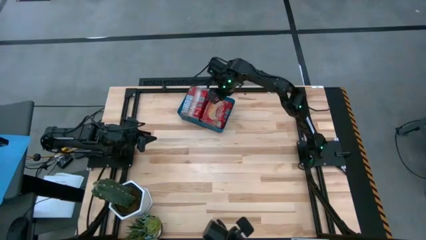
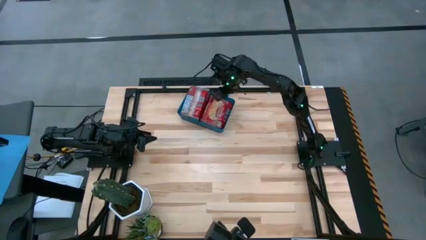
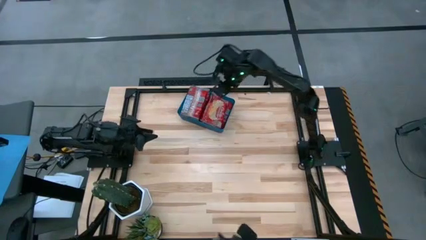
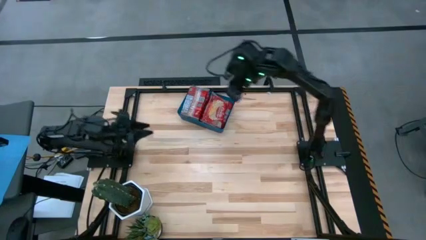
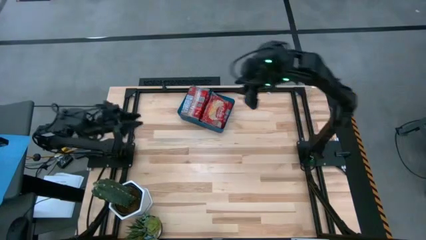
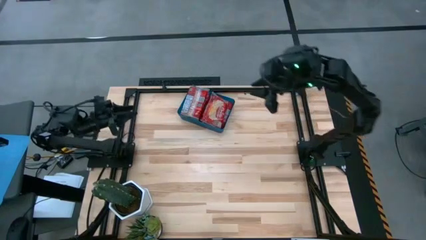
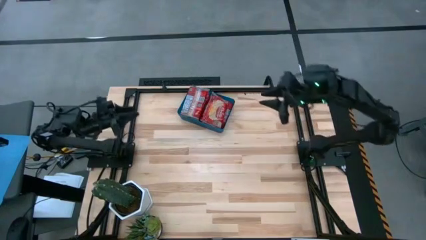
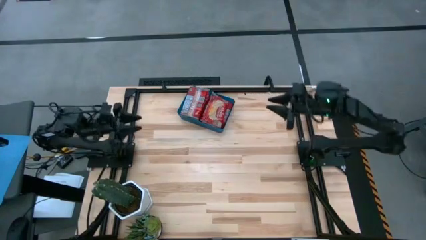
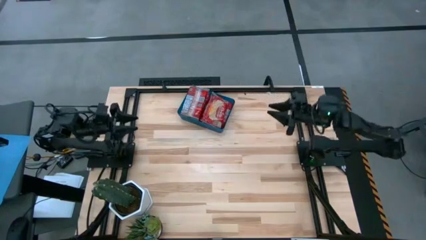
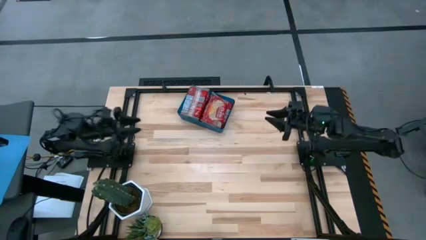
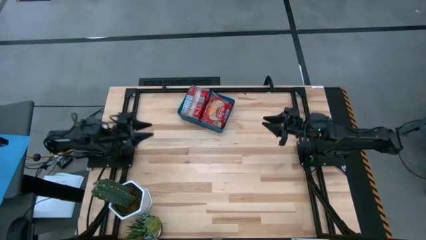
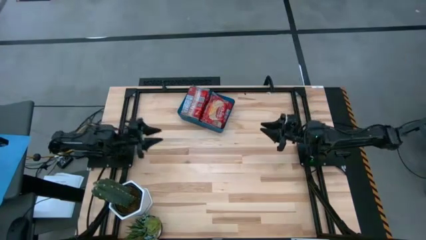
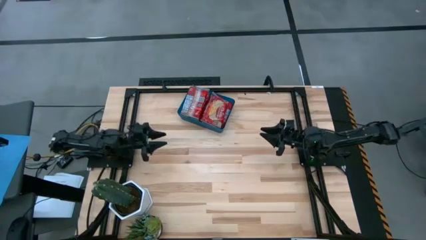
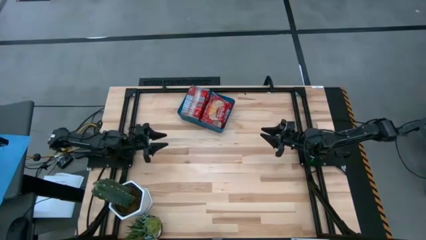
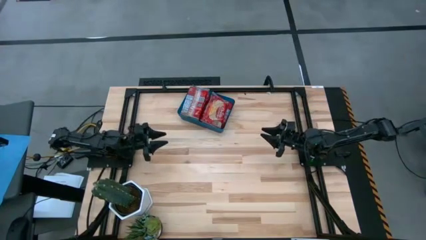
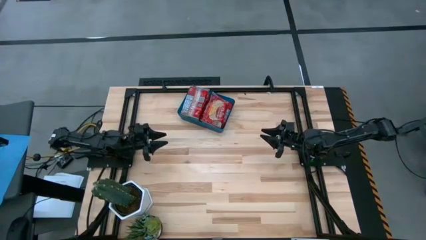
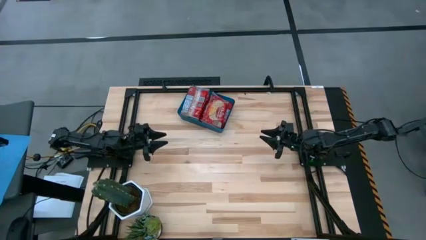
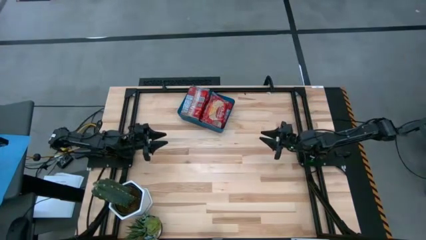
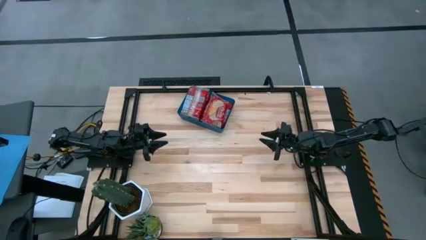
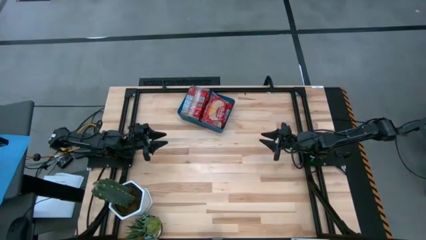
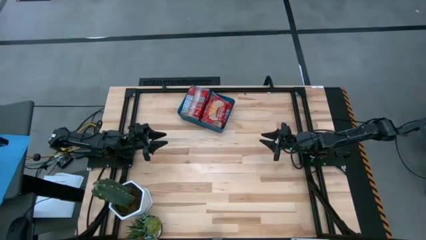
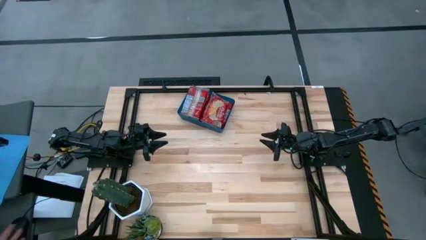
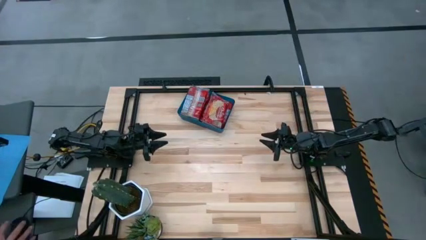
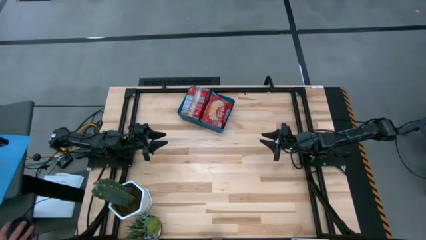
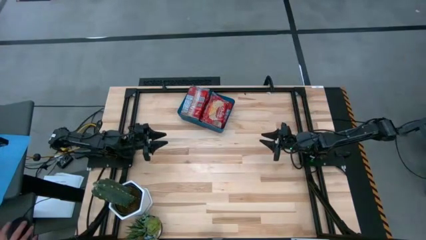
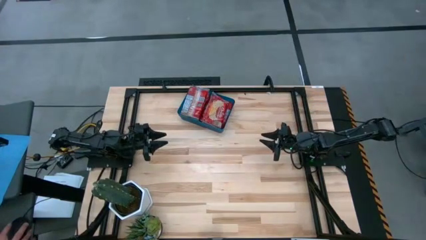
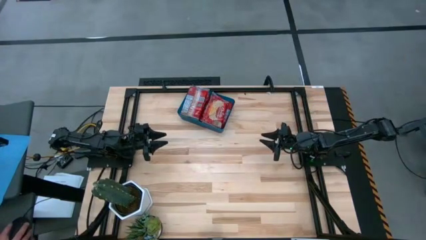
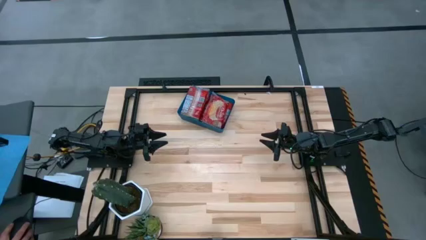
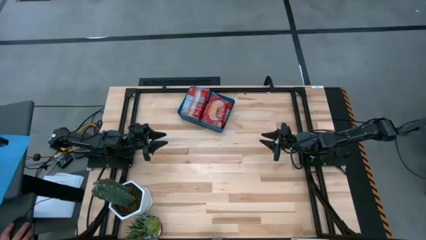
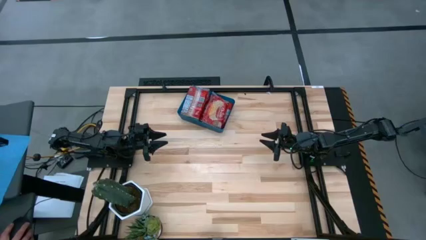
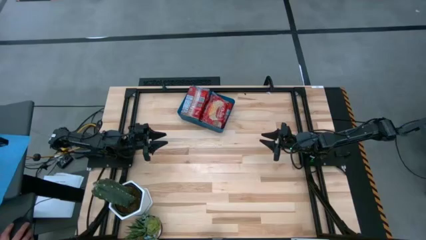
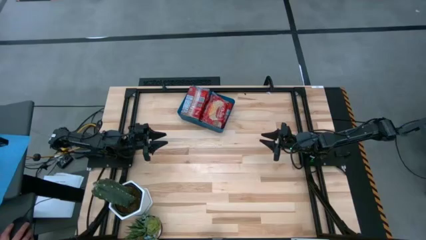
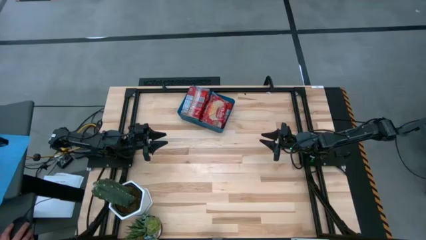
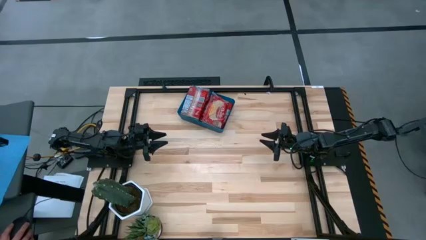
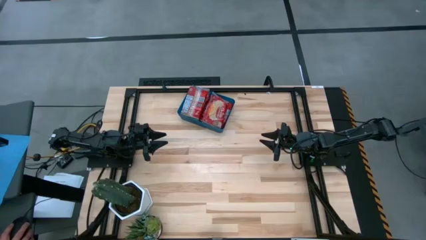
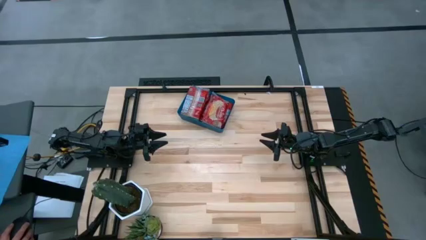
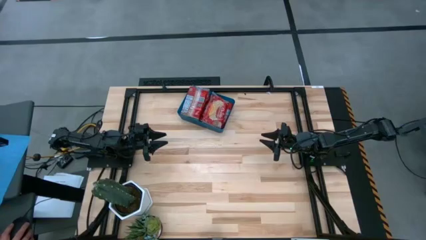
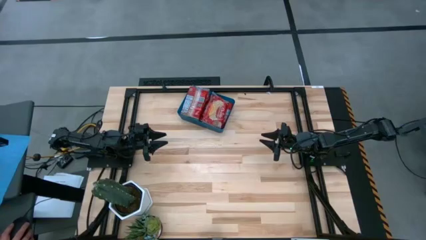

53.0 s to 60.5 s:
Task: Sort popcorn bags into baskets
Return to Home Position

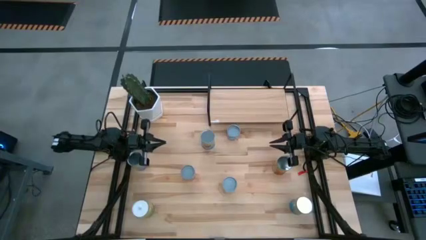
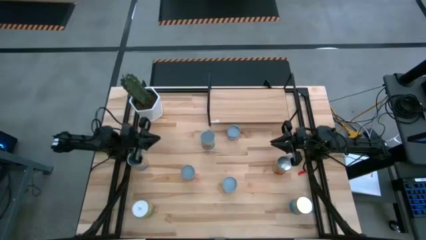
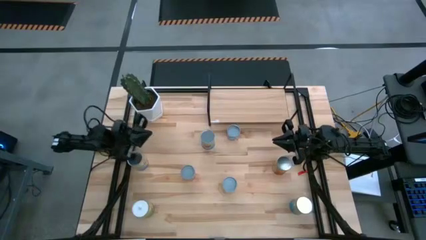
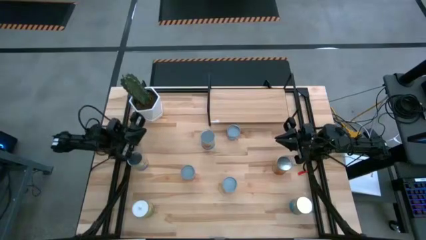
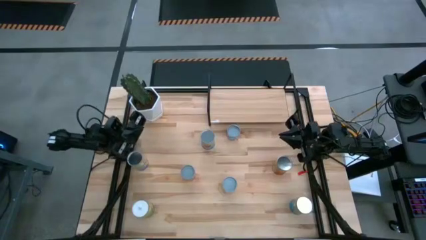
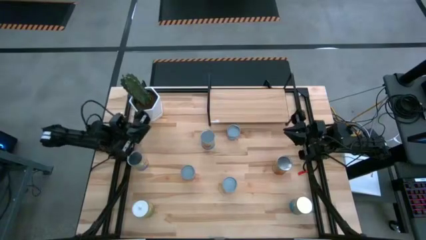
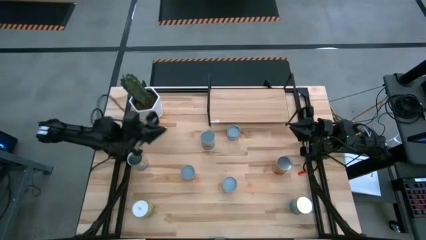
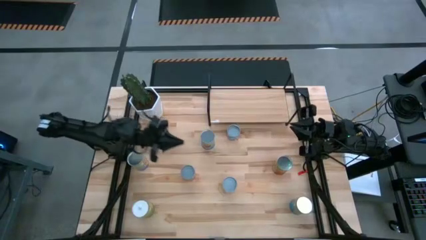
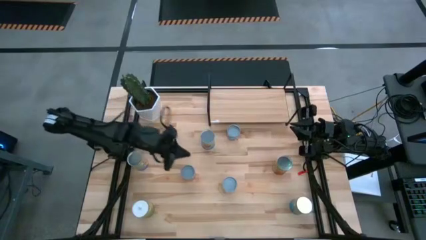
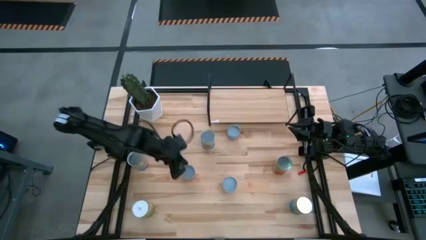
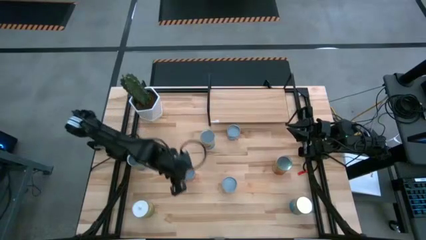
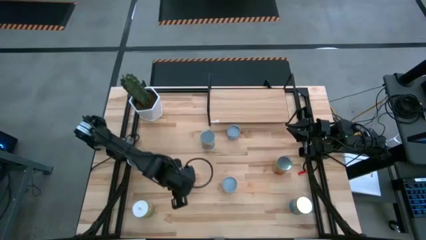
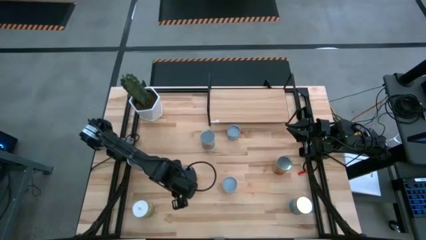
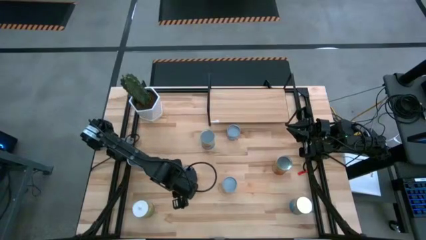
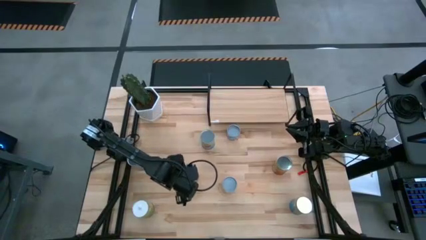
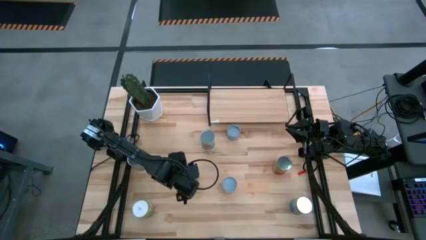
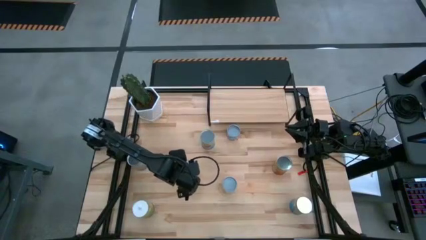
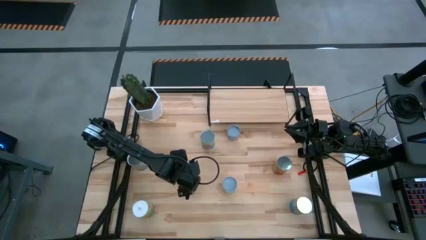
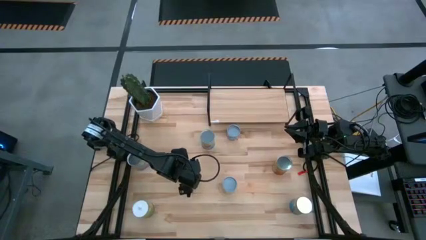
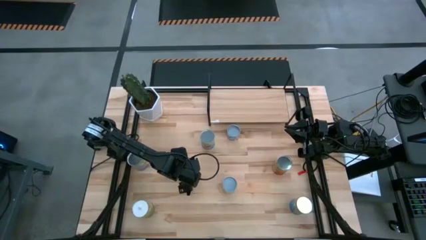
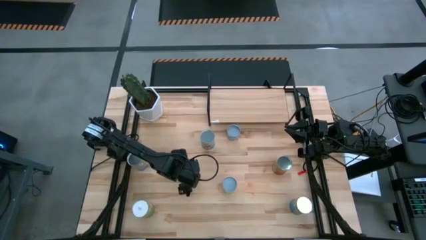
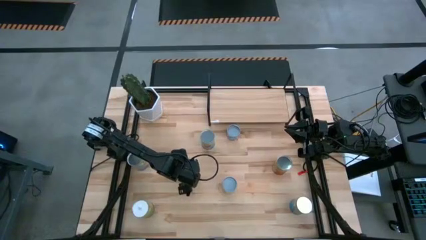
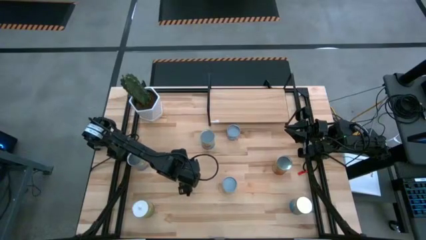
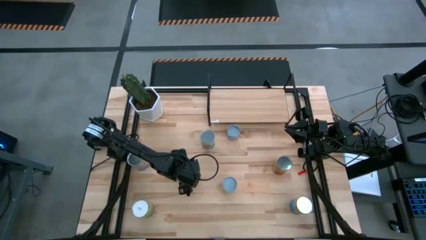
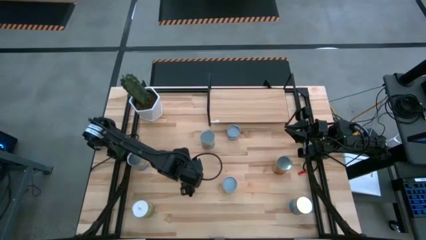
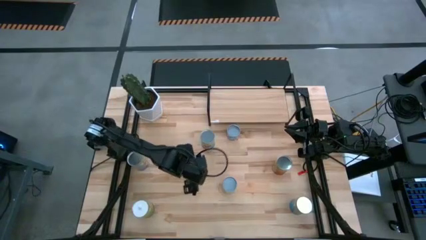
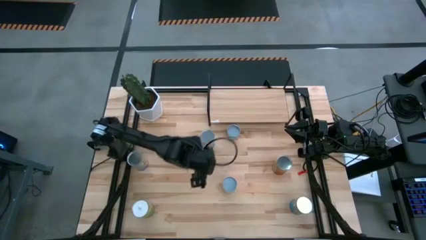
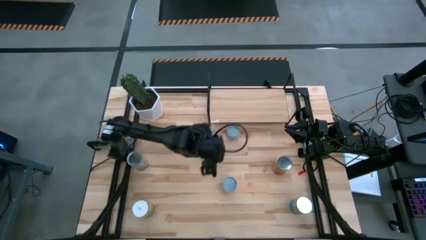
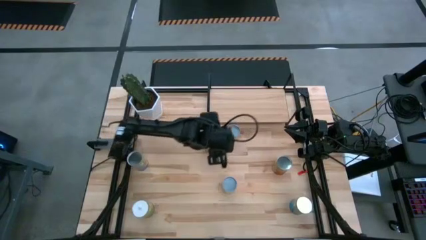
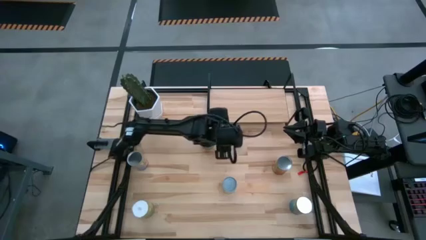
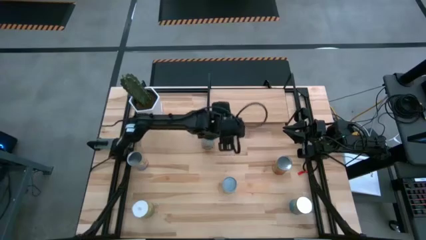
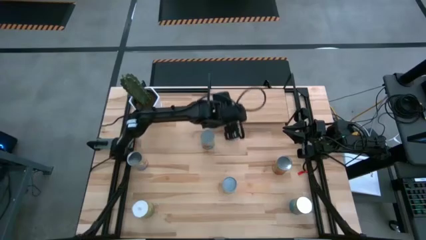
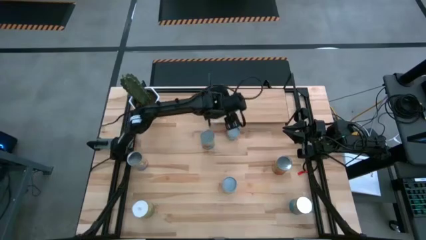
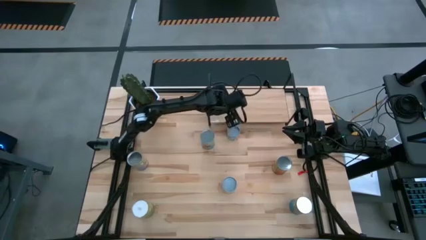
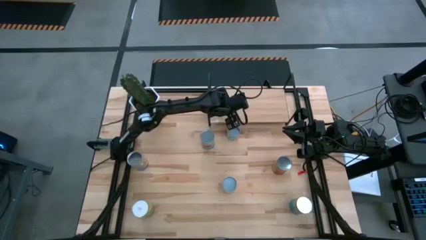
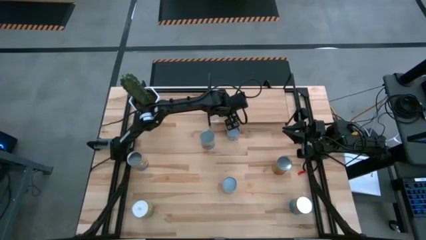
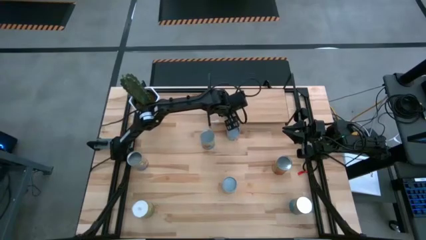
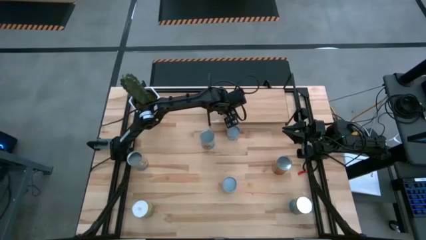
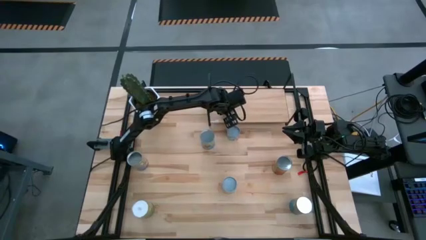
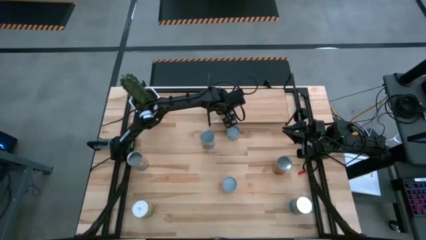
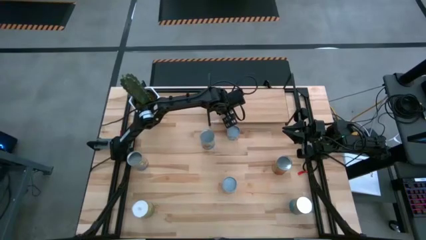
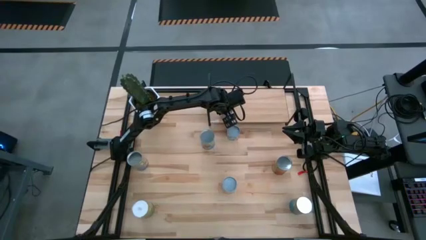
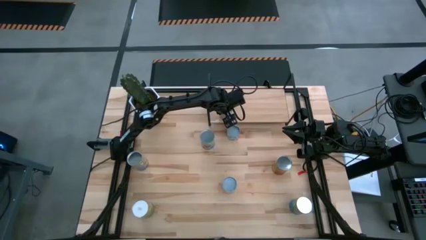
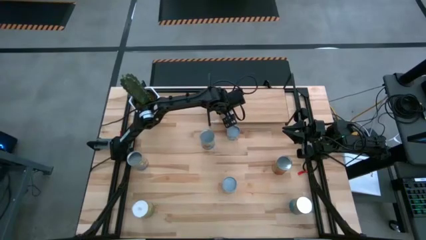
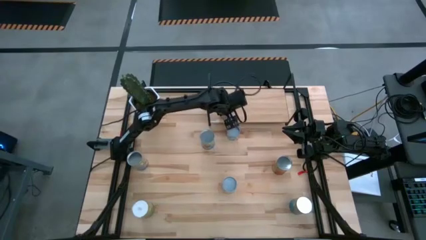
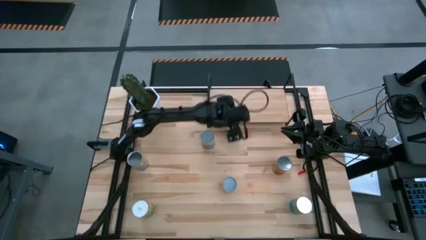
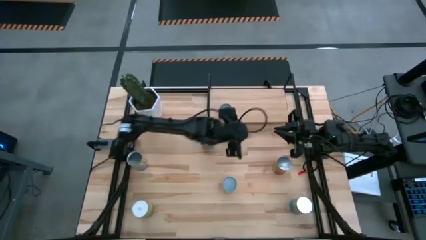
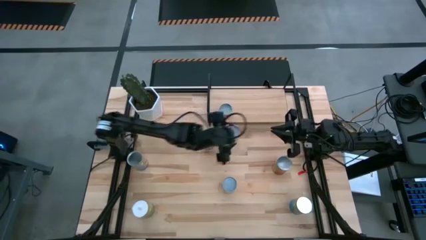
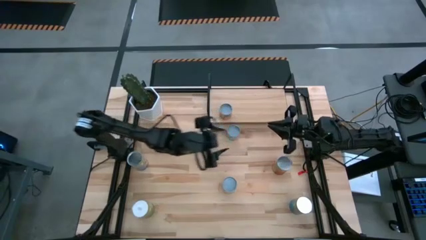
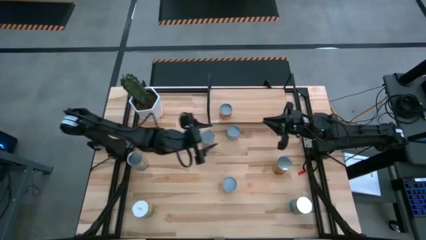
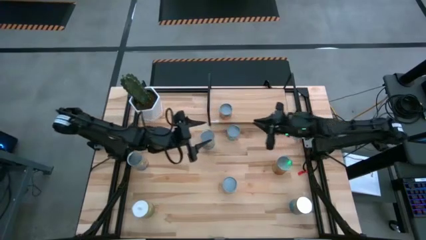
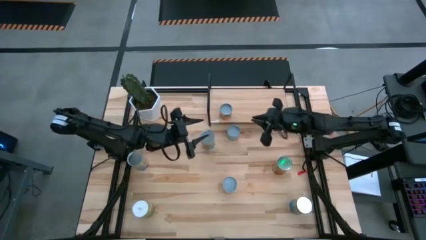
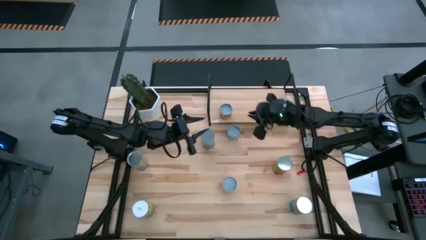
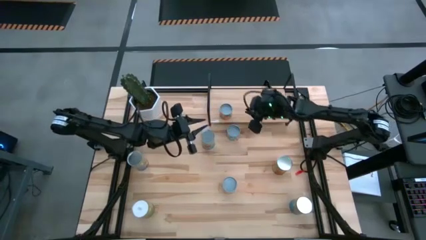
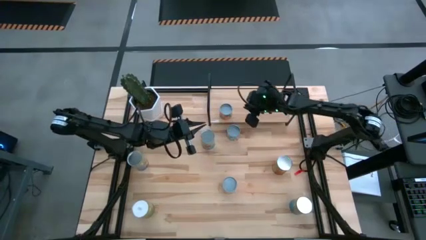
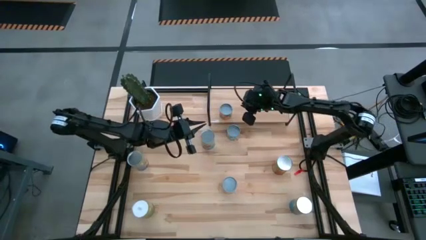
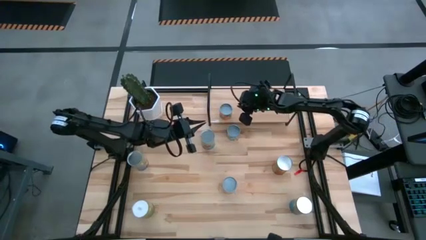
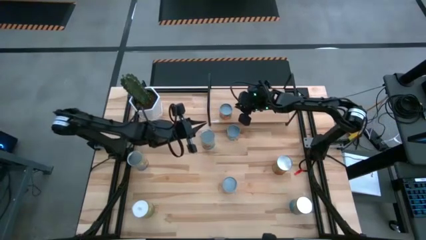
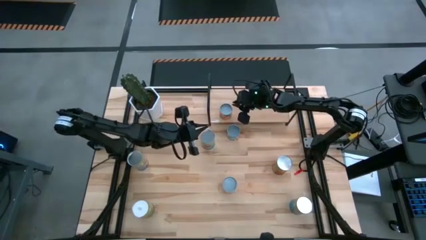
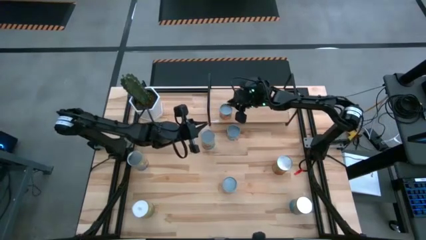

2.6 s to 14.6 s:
Task: Pick and place cans onto a shelf
Put the small canned oranges on the shelf
